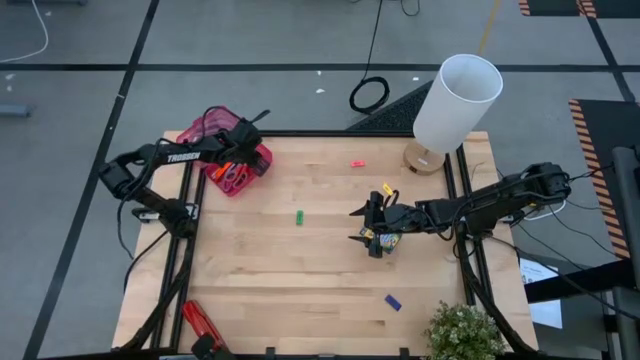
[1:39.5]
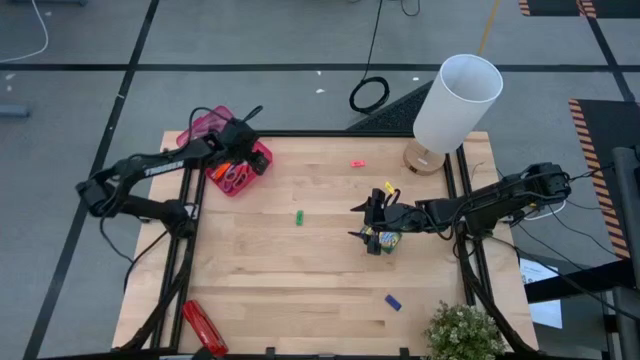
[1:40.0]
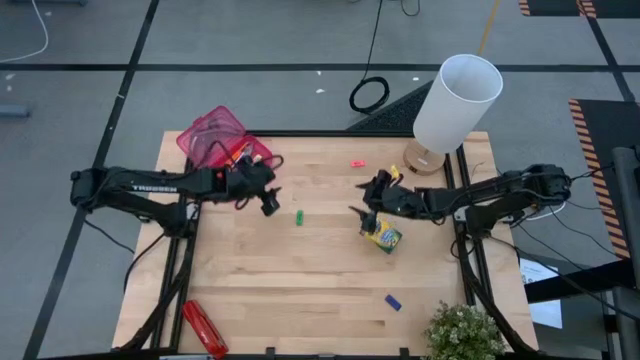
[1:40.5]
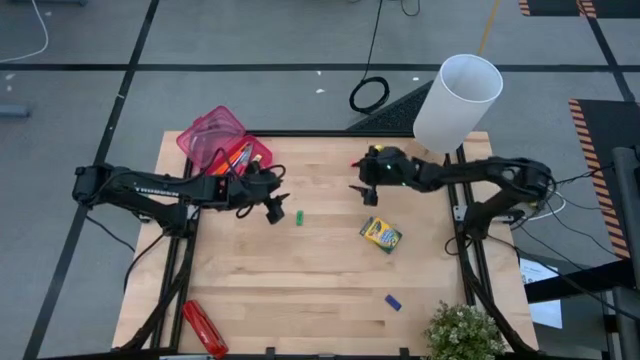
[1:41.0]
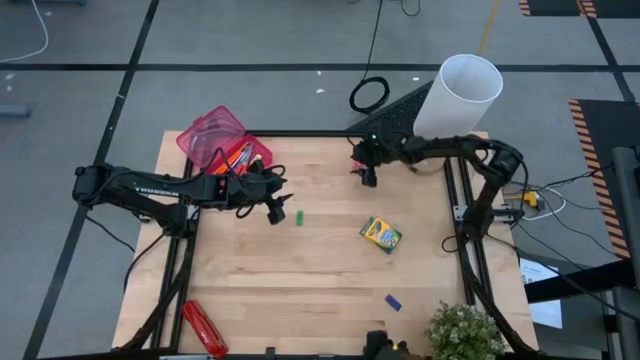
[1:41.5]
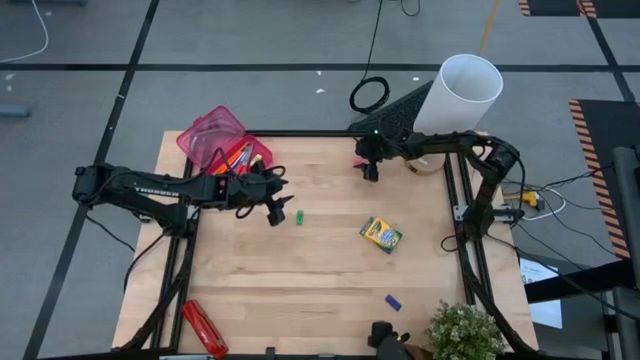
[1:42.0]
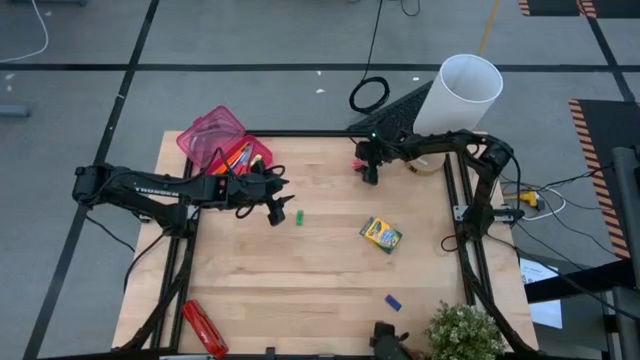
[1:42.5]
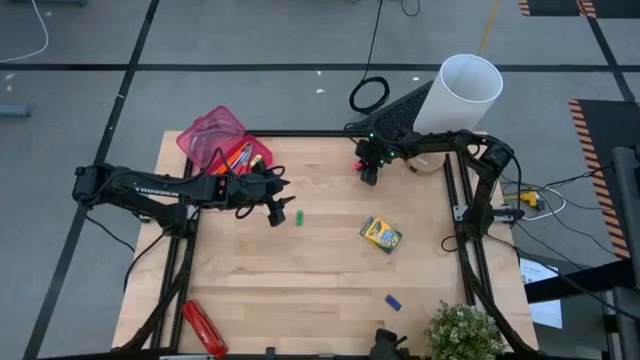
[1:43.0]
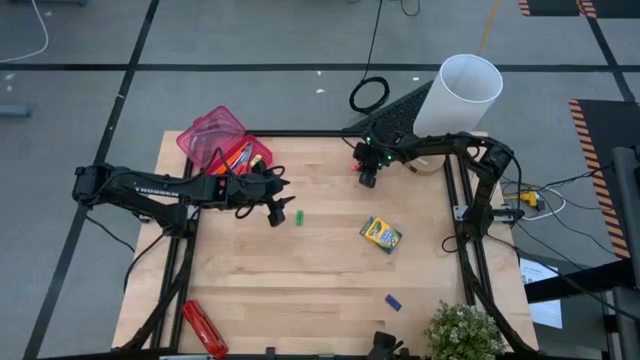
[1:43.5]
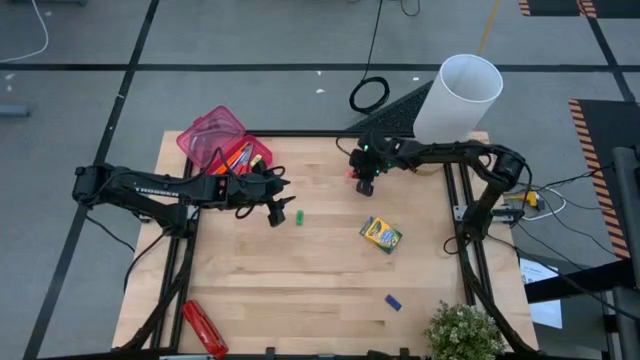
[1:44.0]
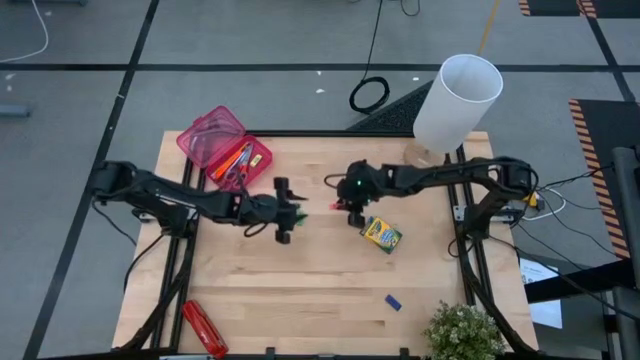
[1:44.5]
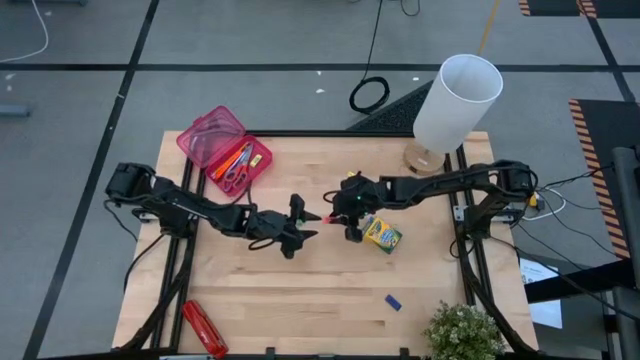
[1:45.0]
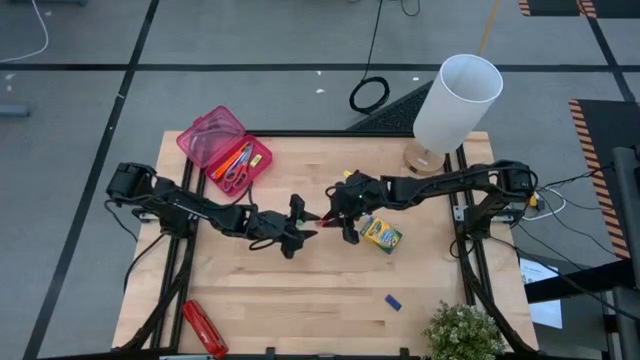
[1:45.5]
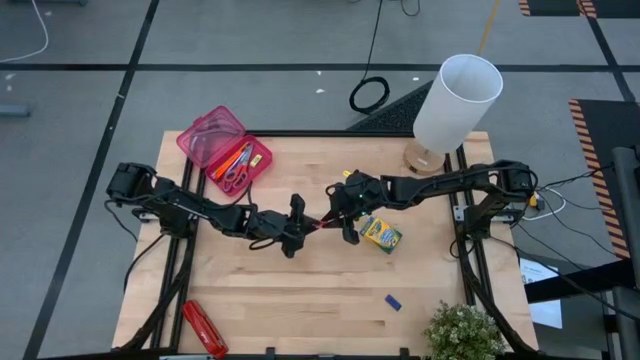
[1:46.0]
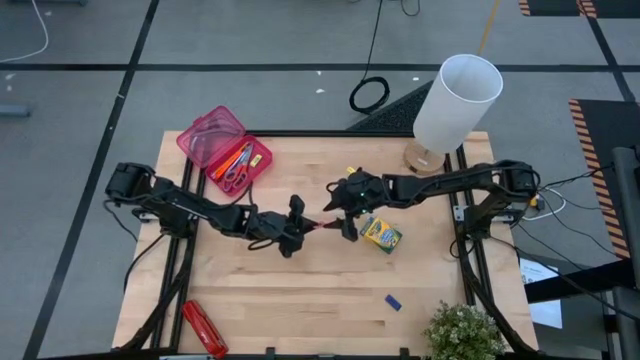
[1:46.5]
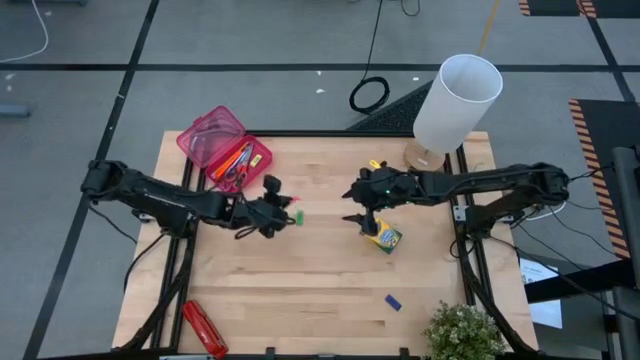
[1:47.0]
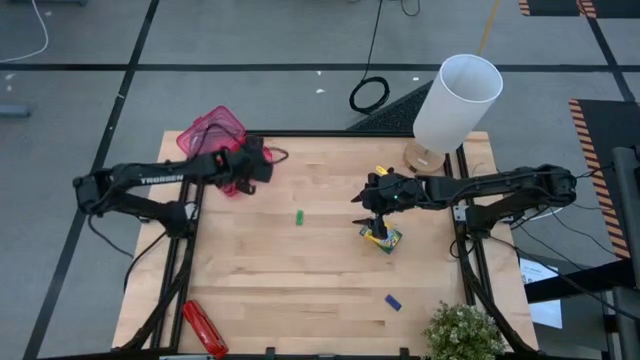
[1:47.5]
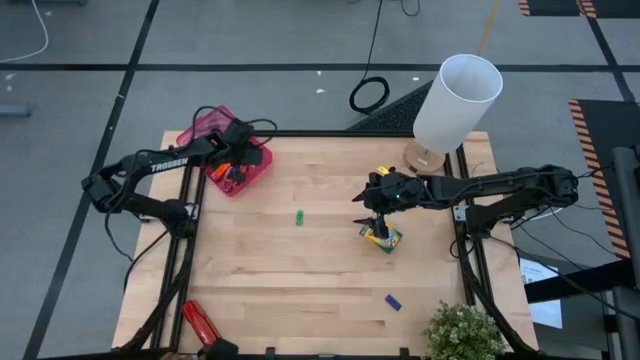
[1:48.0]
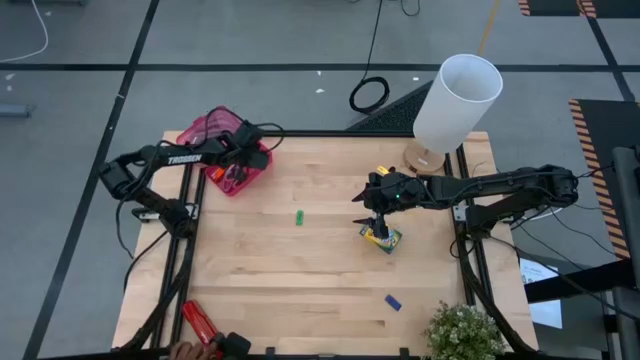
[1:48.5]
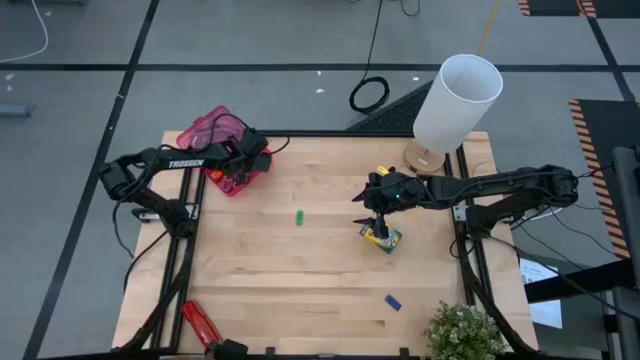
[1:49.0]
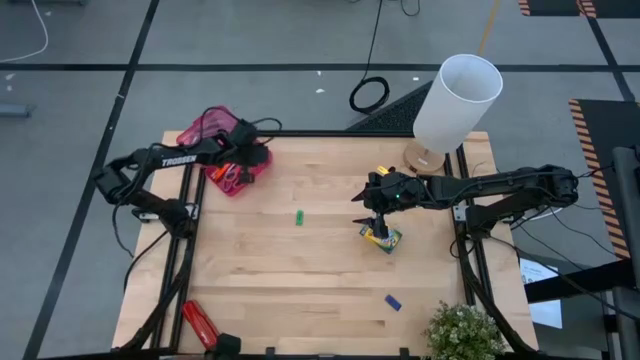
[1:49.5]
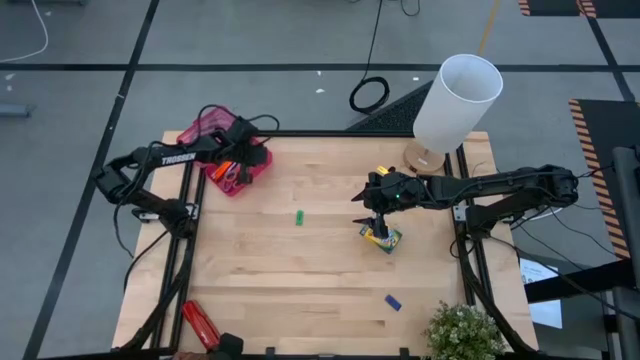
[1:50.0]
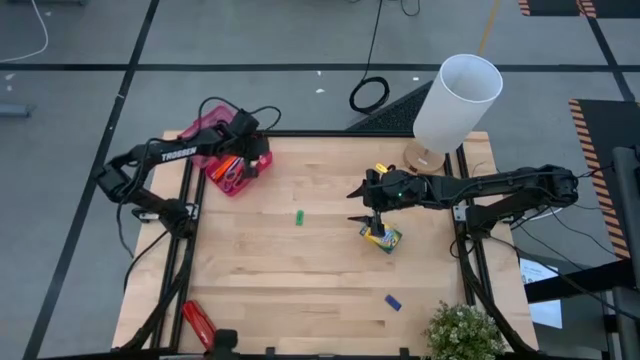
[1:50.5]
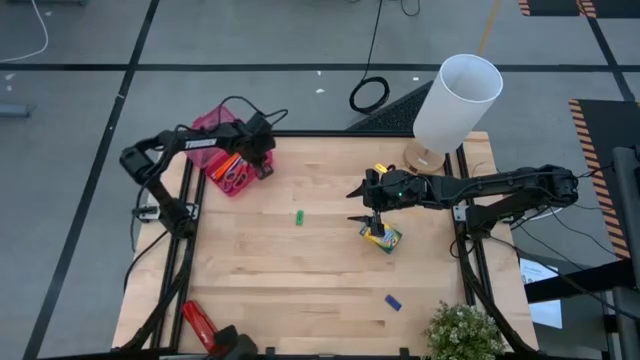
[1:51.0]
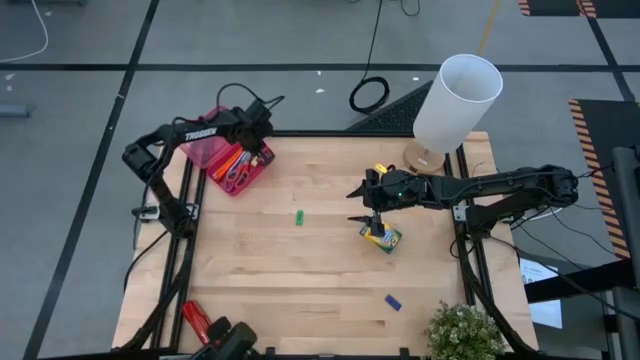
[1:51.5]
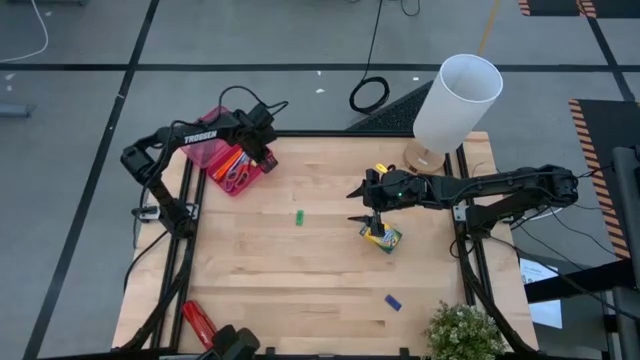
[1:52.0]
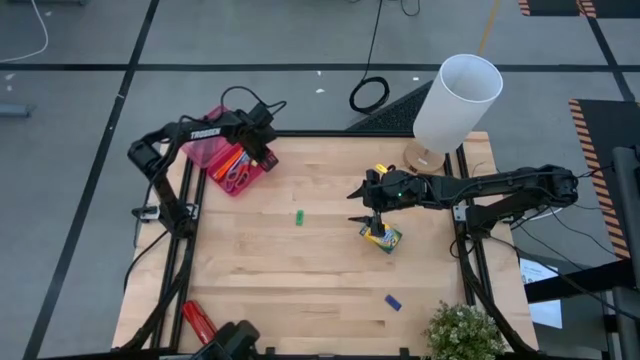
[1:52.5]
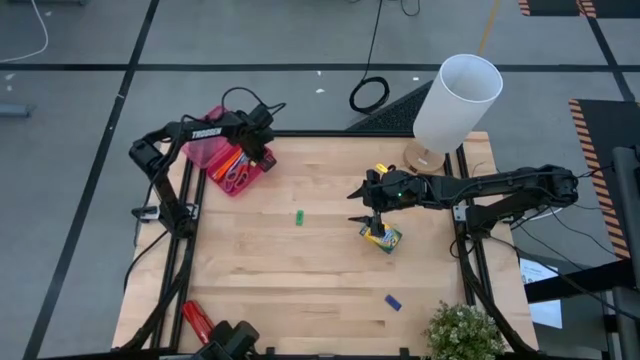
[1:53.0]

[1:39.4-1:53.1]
Task: Pack school essentials
Put the pink eraser into the pink supply box

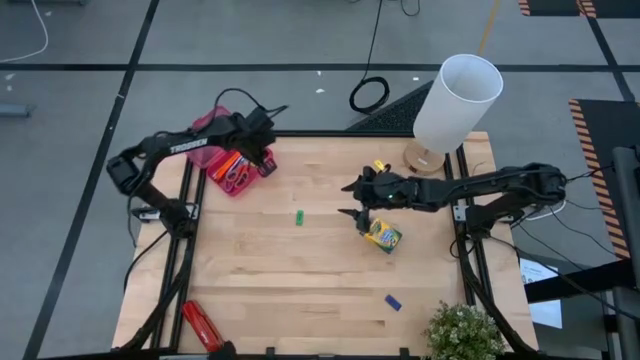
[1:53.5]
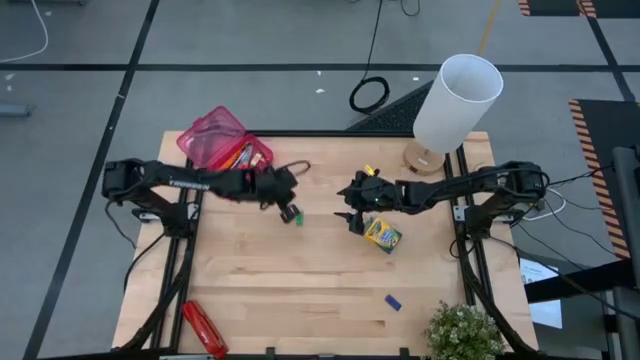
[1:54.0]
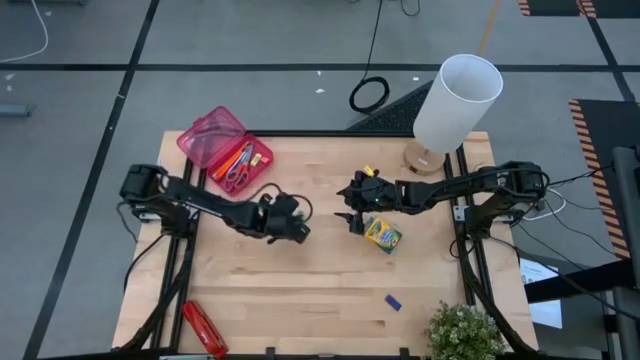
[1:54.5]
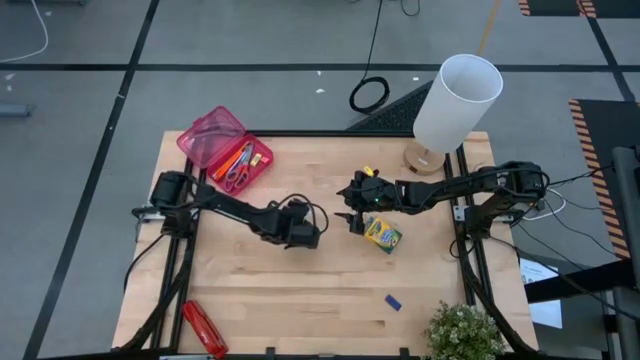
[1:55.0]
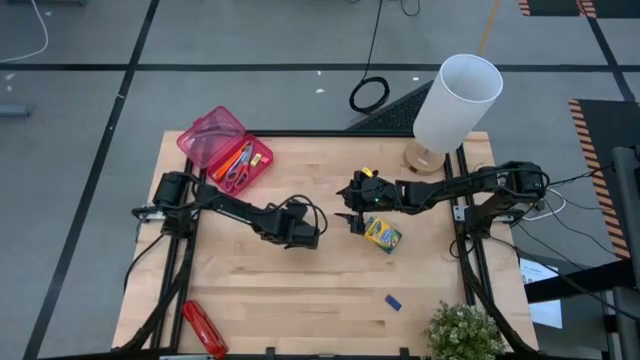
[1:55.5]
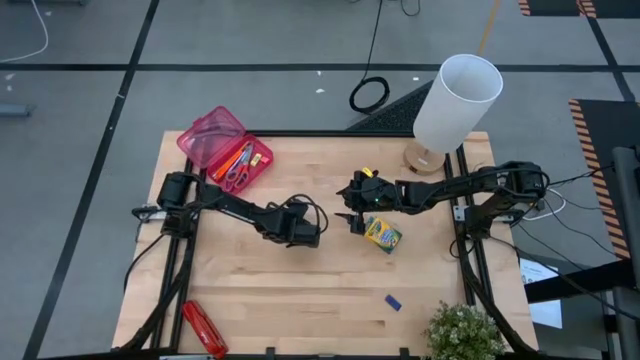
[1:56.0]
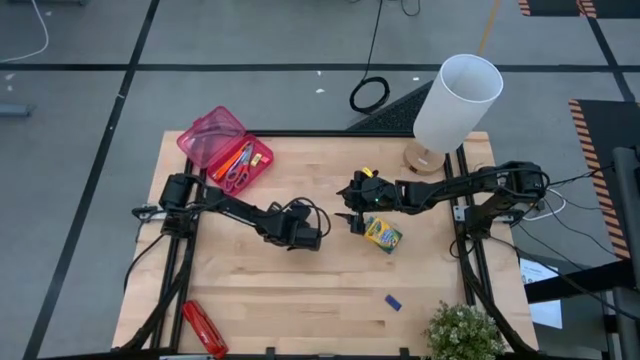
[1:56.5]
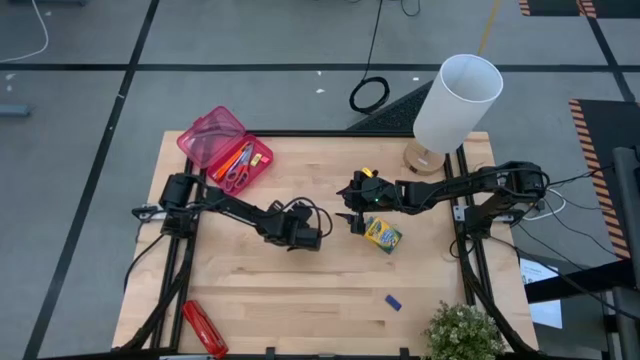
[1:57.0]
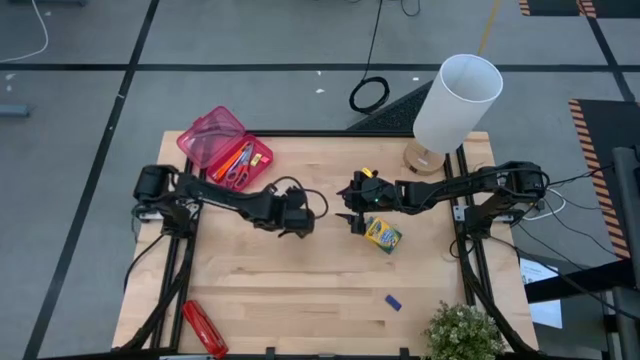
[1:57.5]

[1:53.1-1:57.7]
Put the green eraser into the pink supply box

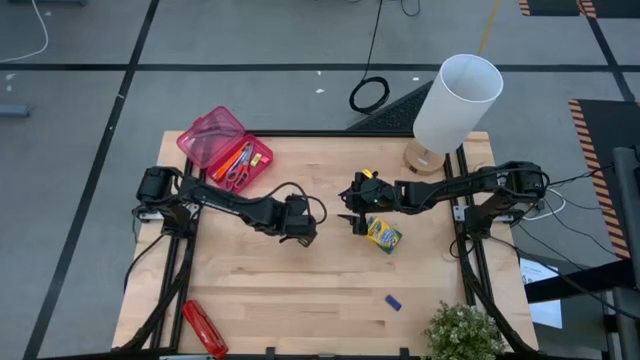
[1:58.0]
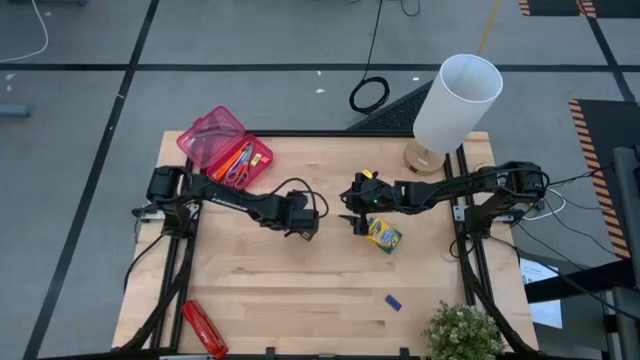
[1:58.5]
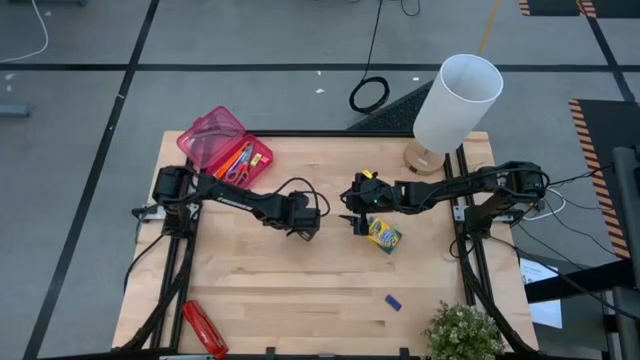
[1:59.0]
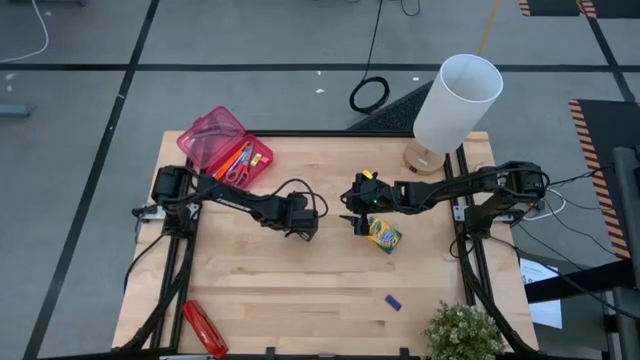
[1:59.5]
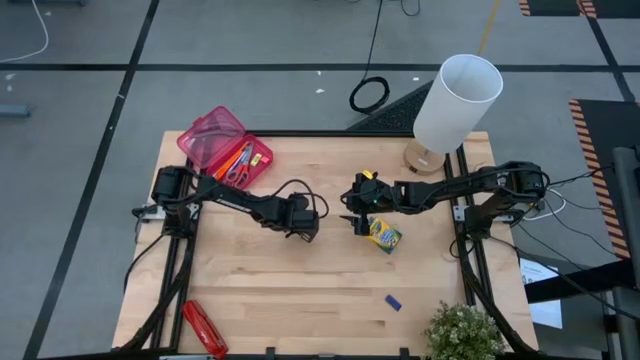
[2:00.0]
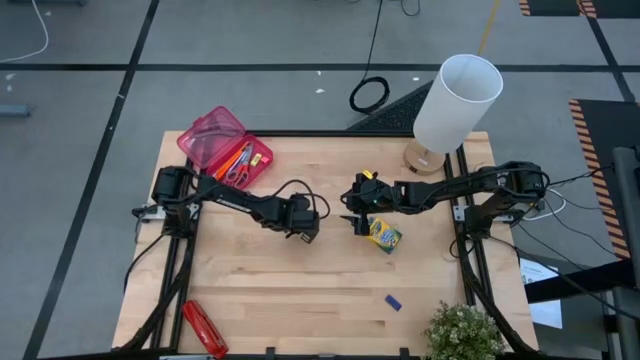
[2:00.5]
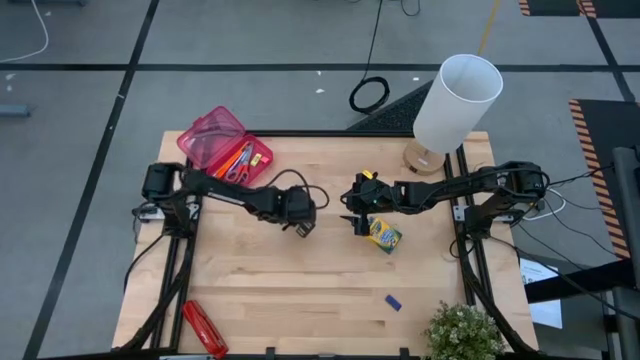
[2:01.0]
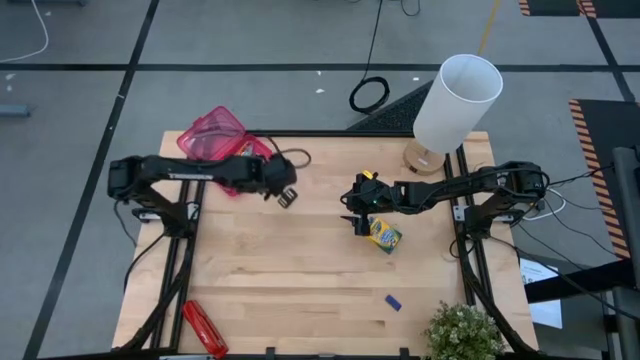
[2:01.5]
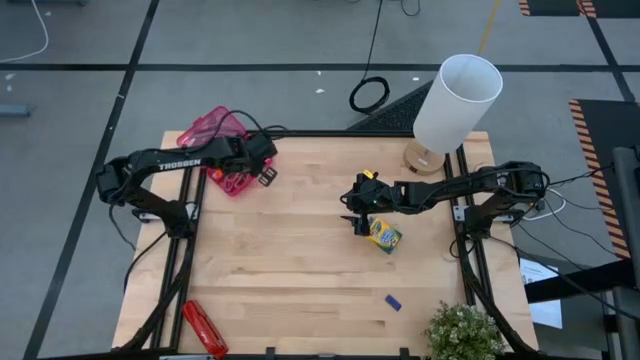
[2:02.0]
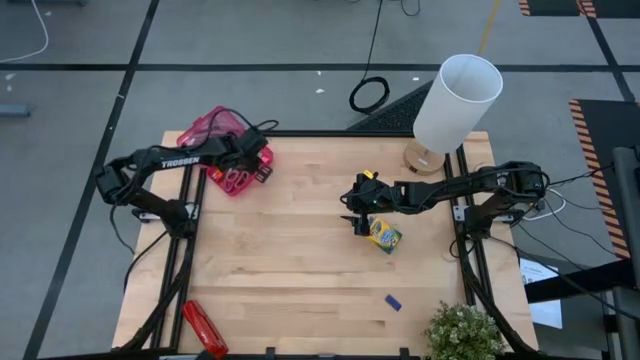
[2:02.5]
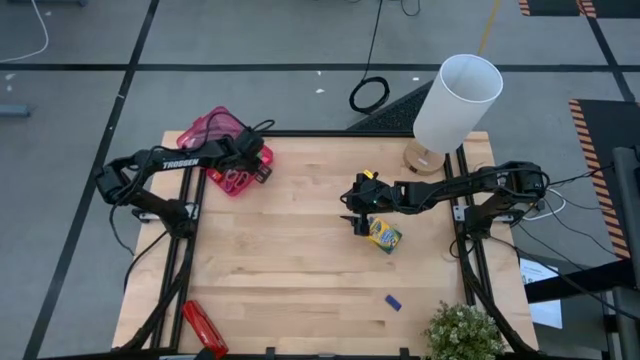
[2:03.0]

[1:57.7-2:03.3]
Put the green eraser into the pink supply box
